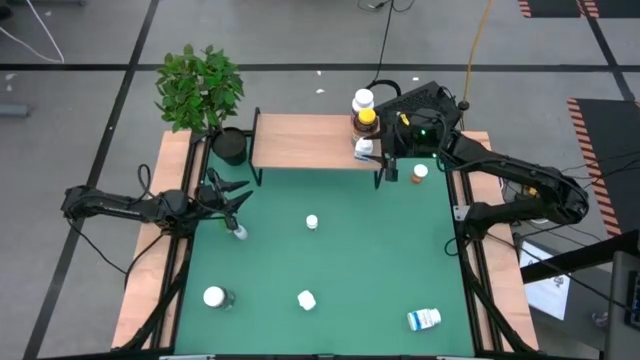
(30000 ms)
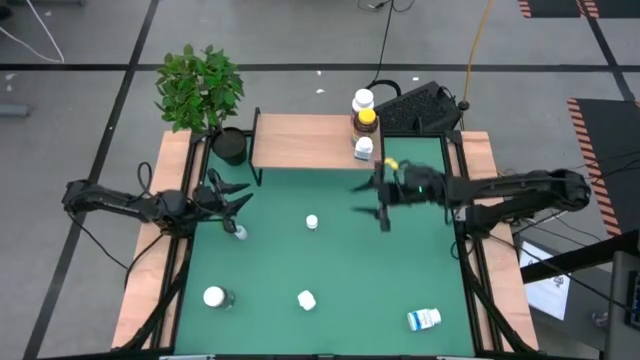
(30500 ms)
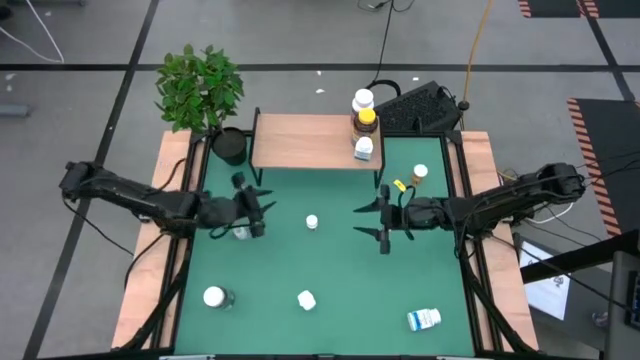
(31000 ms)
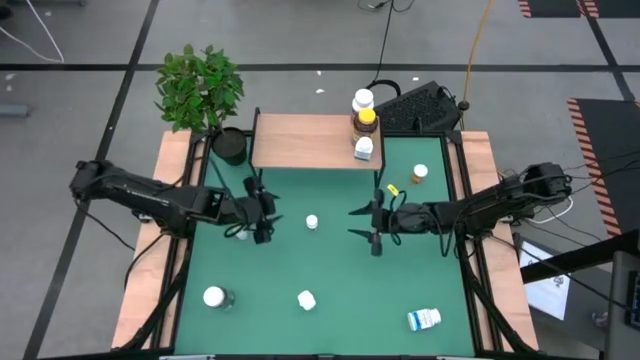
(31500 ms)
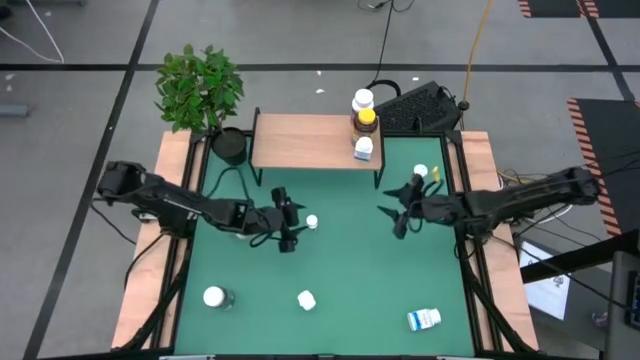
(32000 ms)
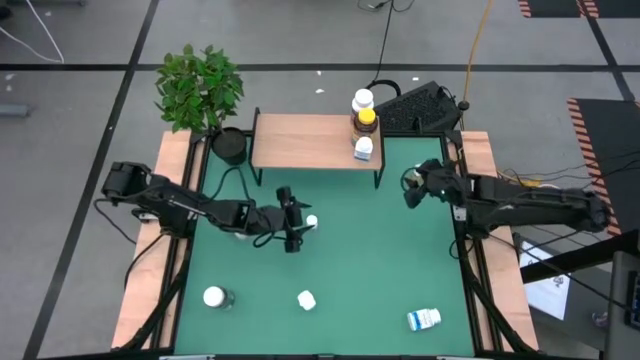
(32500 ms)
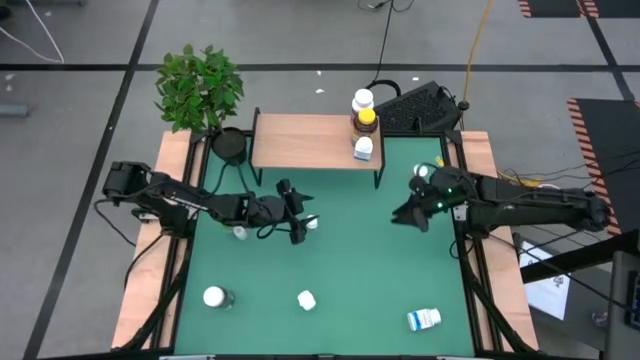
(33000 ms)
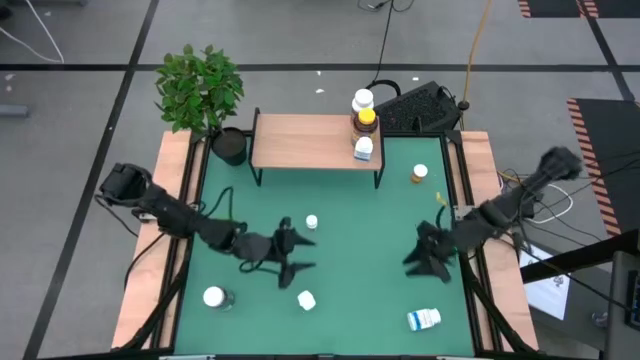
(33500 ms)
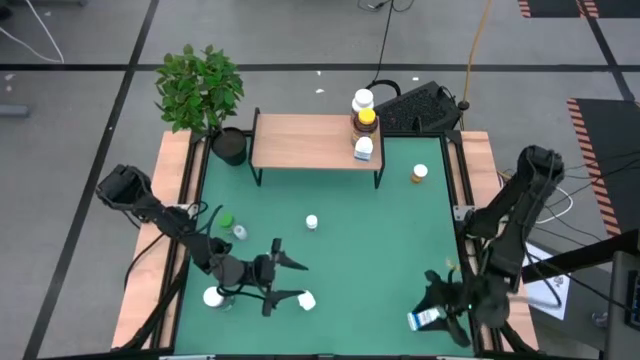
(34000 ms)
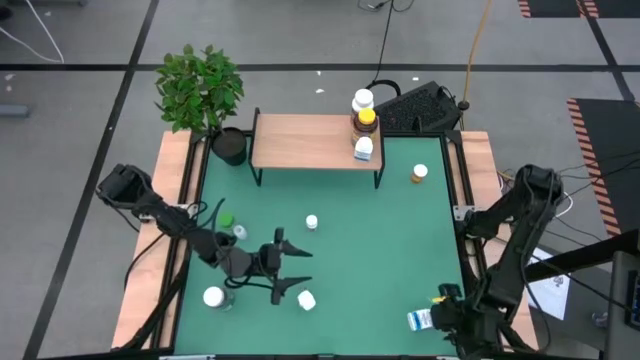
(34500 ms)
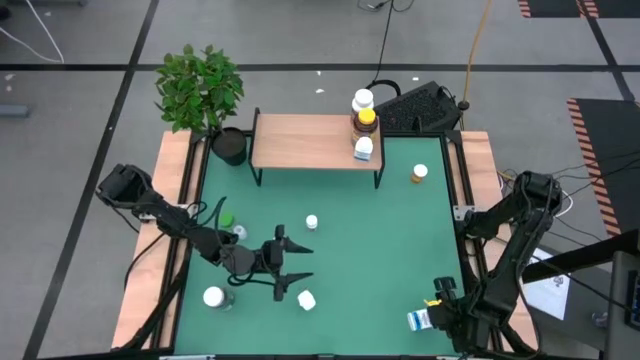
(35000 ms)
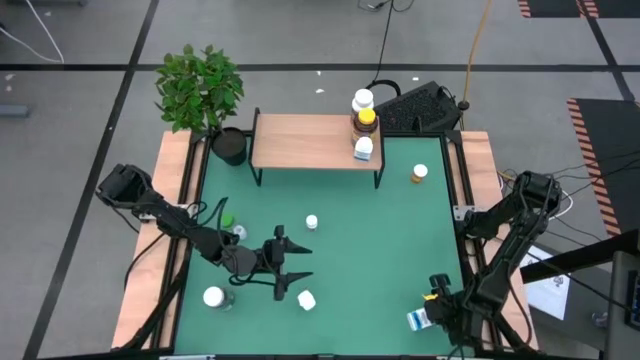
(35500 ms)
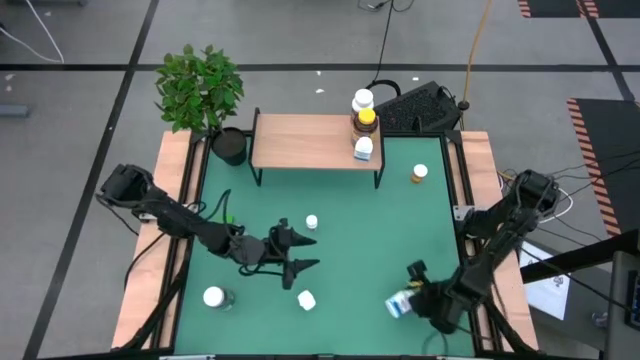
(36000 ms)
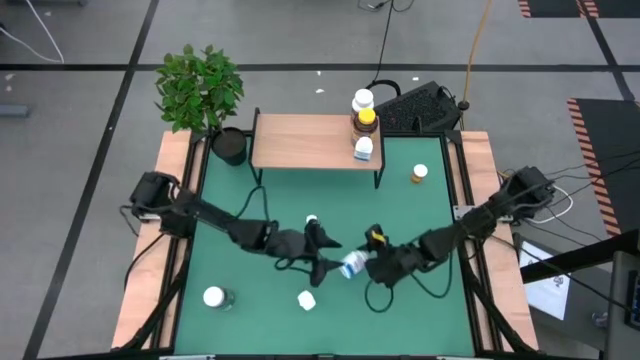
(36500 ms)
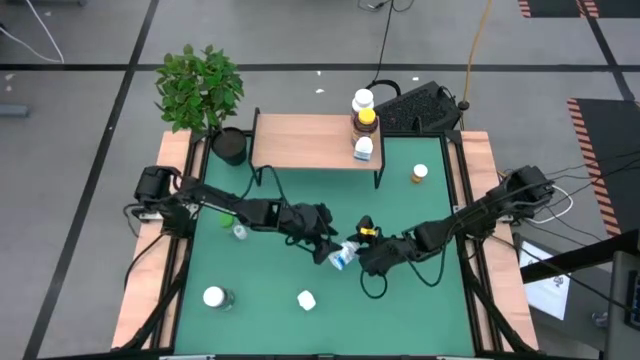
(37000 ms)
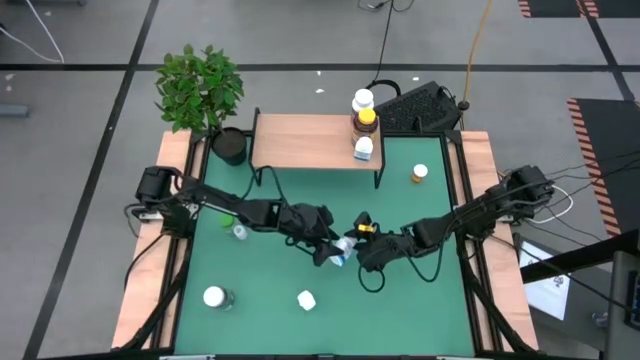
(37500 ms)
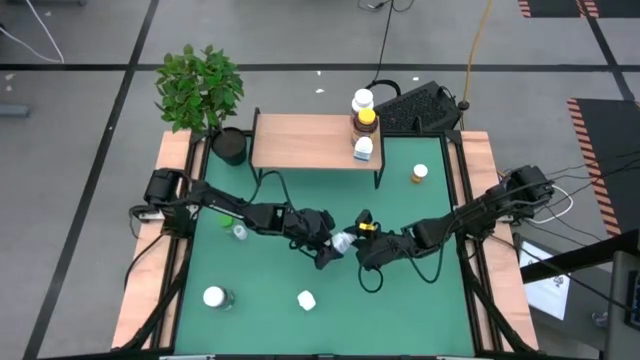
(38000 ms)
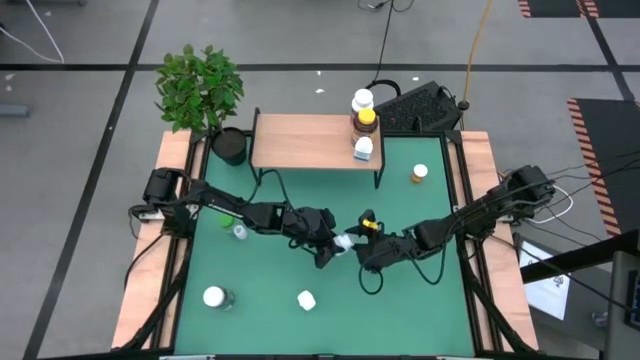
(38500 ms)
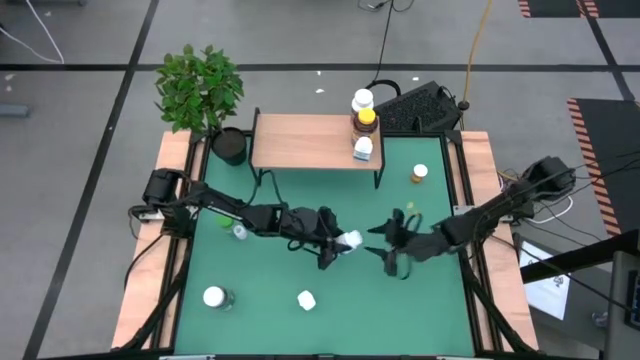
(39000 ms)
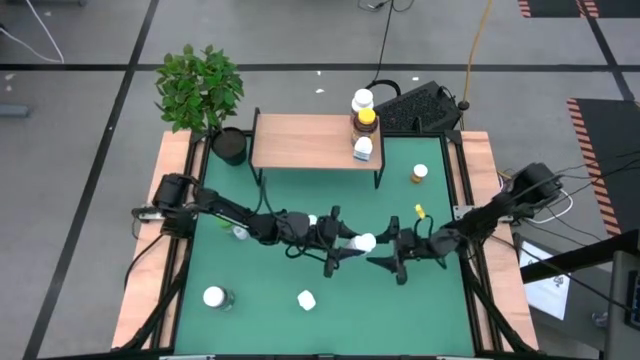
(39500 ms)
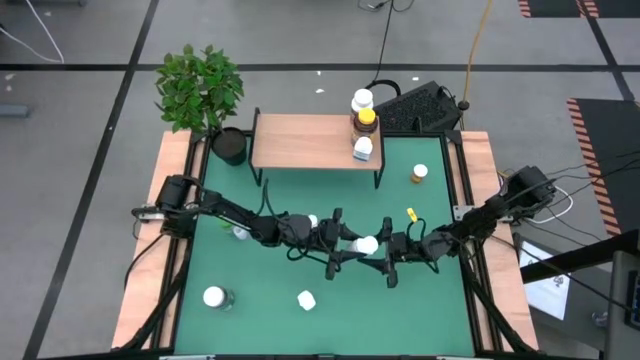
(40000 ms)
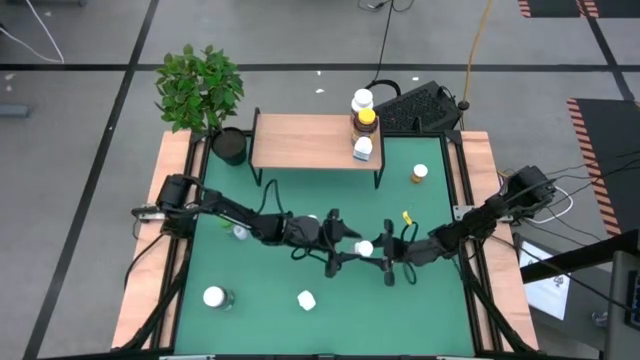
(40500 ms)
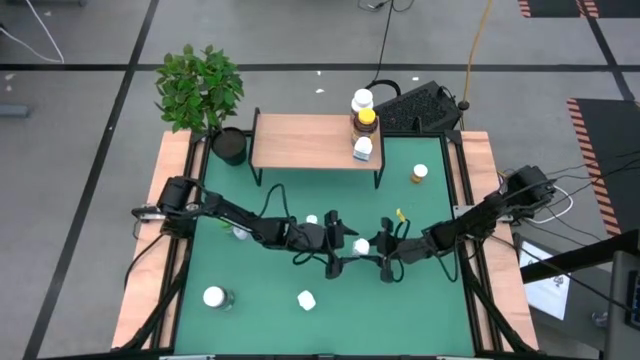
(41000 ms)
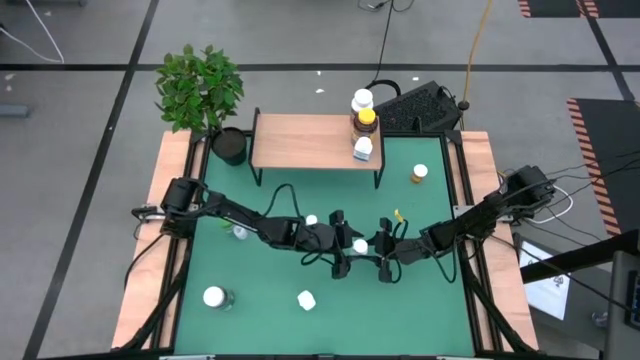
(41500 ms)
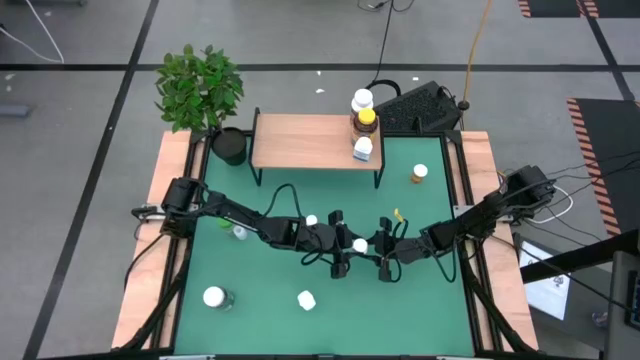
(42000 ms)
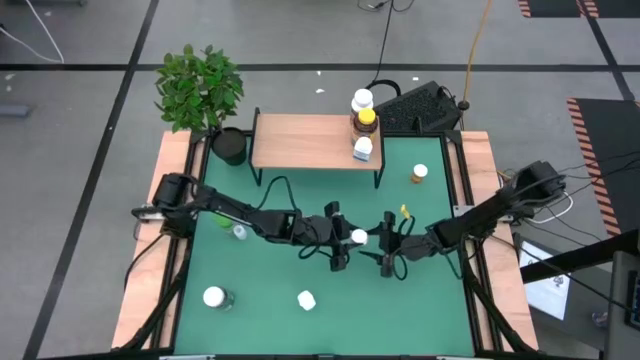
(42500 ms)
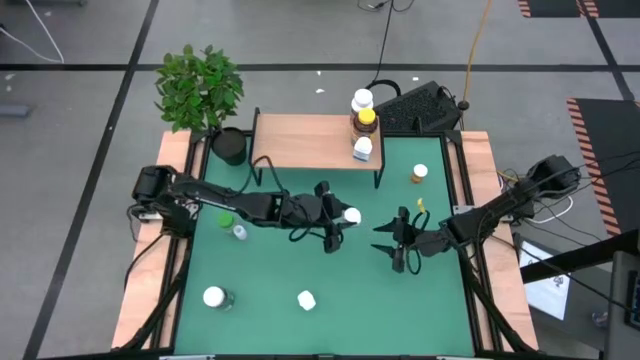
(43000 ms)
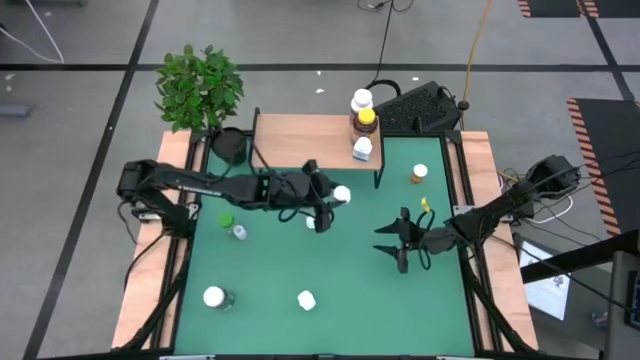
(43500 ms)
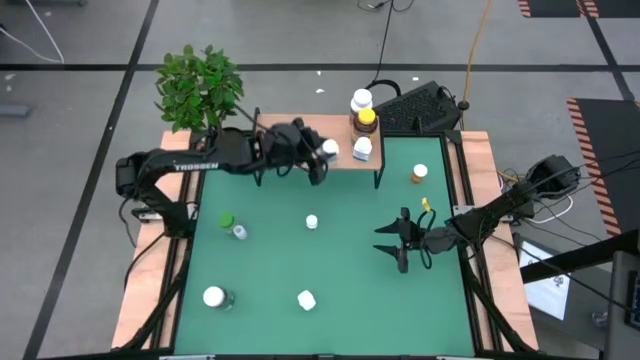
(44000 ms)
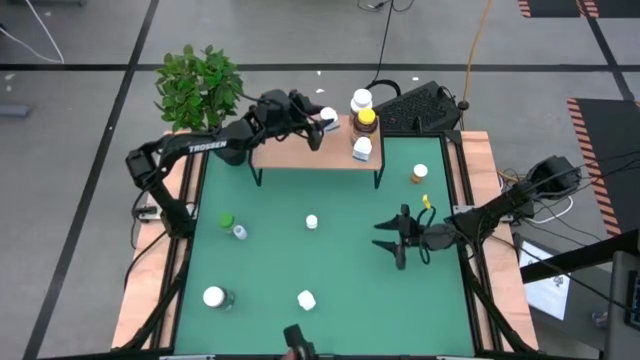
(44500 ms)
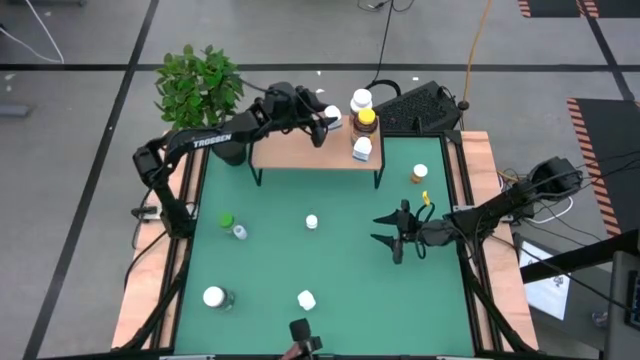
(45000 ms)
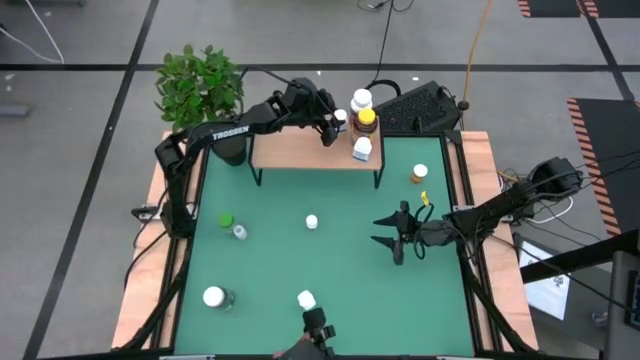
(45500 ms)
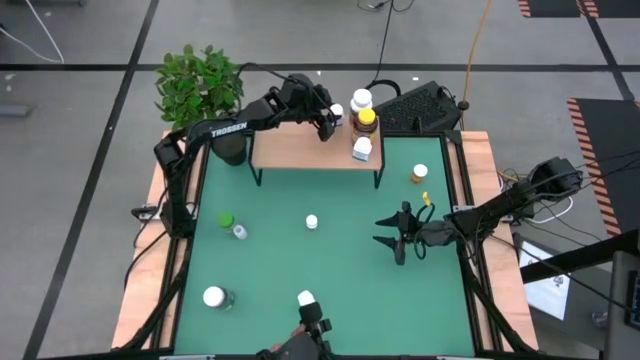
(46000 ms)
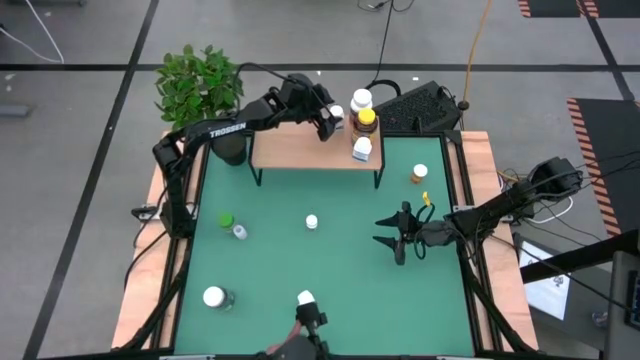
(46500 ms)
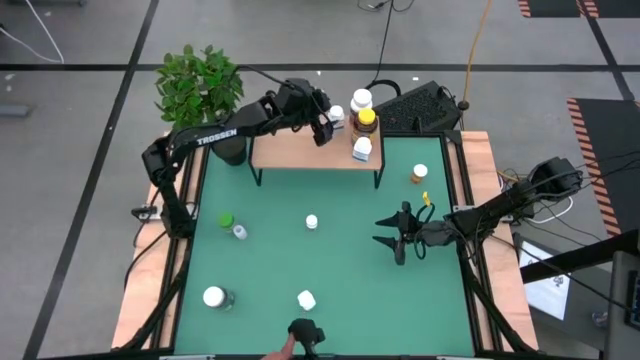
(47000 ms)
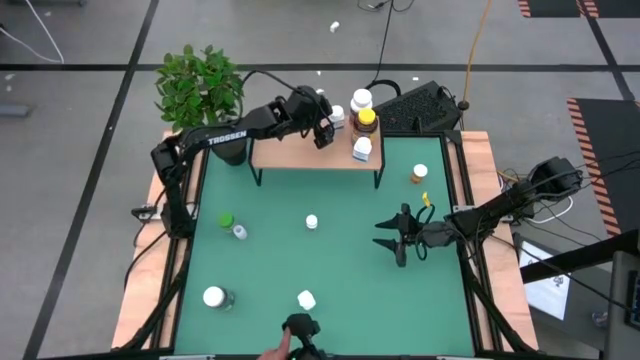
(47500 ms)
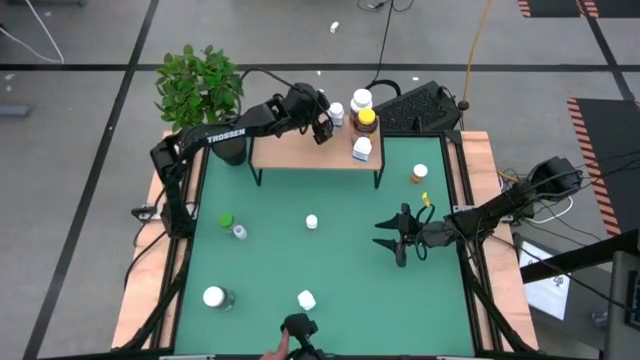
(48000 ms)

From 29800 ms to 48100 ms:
Task: Pick and place medicine bottles onto shelf by color
Put the large white pill bottle on the right shelf

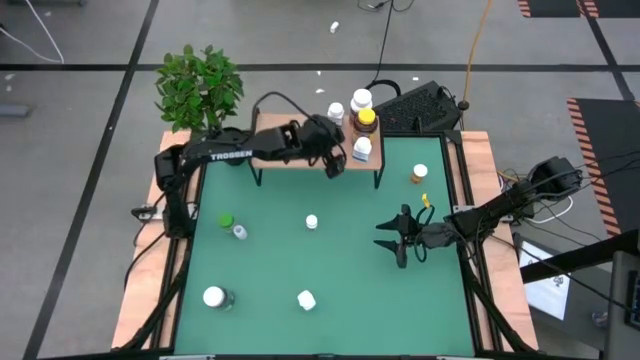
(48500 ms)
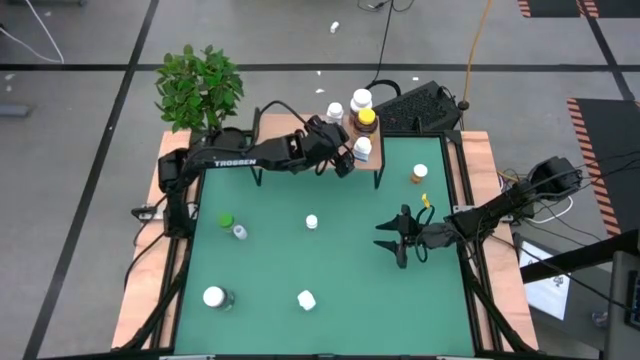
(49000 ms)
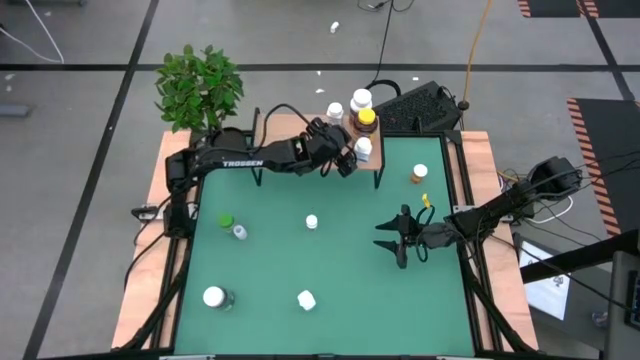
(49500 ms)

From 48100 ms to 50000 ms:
Adjust the large white pill bottles on the shelf

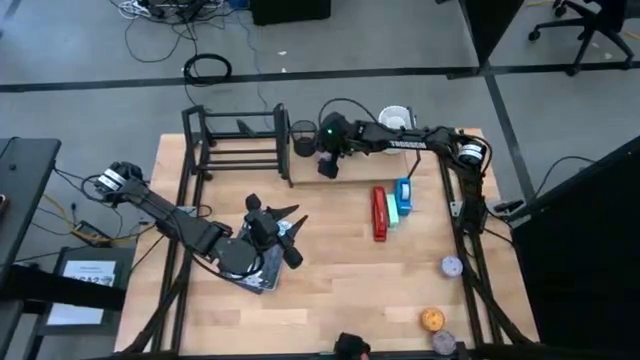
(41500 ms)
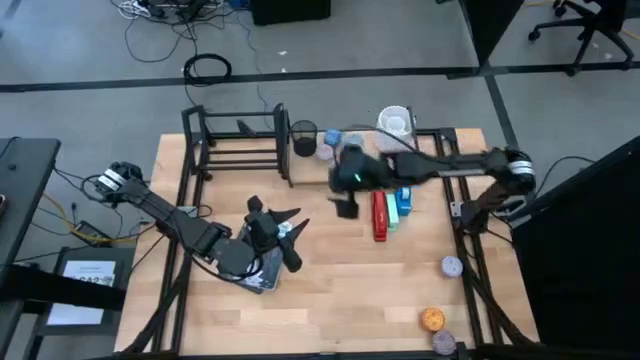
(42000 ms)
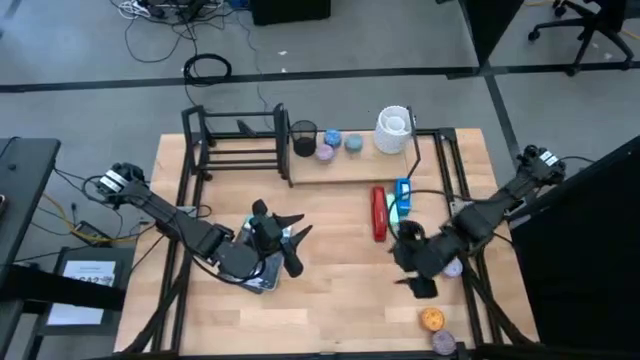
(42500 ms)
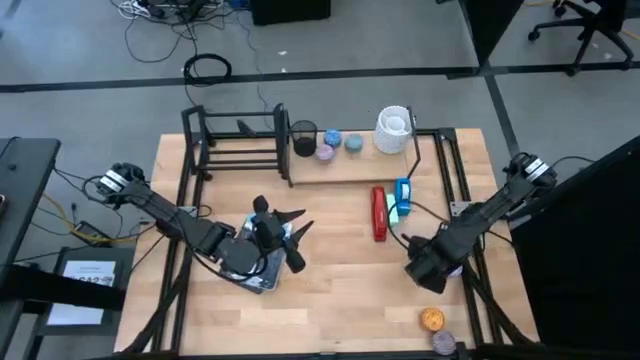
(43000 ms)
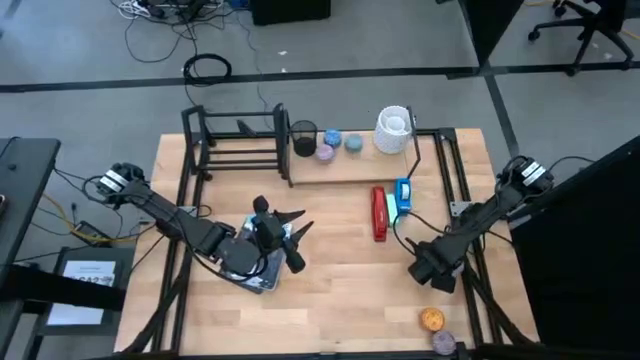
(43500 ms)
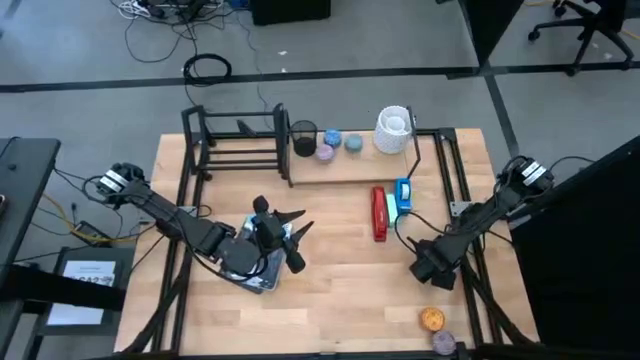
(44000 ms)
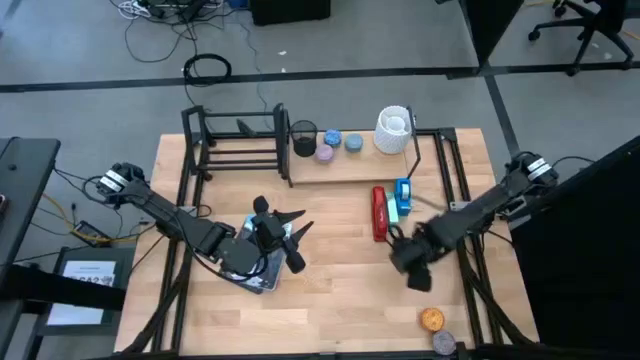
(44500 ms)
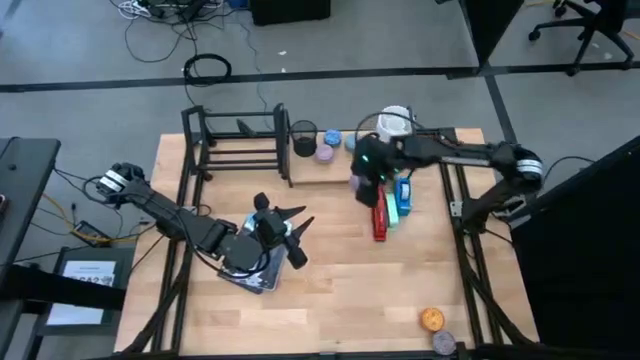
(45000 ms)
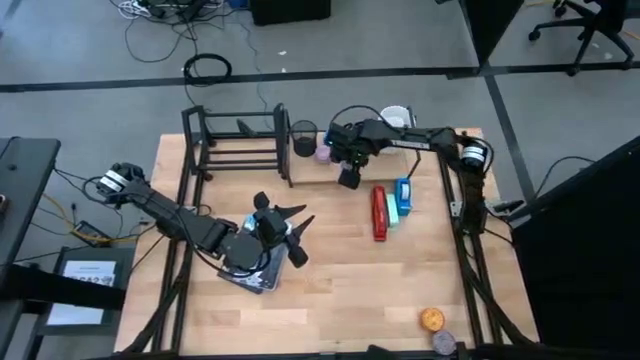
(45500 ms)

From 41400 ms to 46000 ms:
Task: Stock shelves
Put the white scented candle on the shelf
